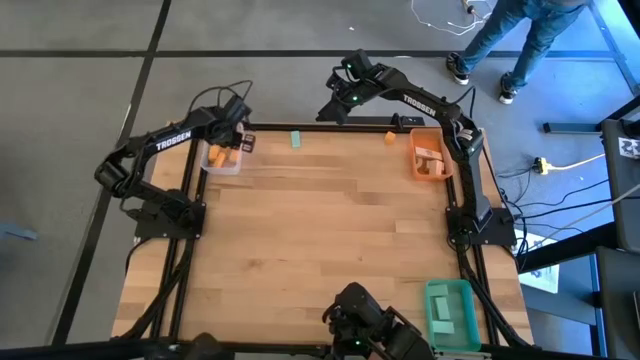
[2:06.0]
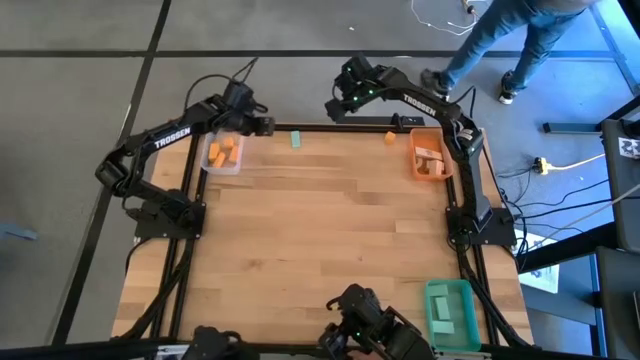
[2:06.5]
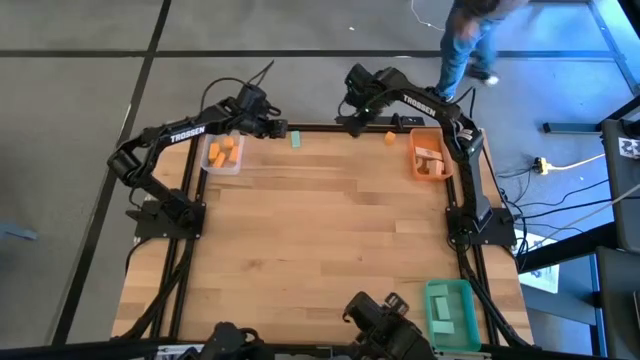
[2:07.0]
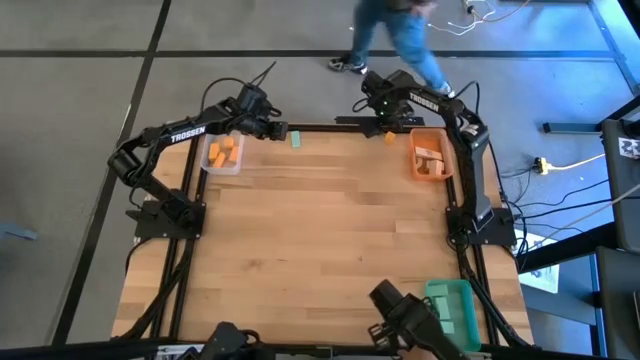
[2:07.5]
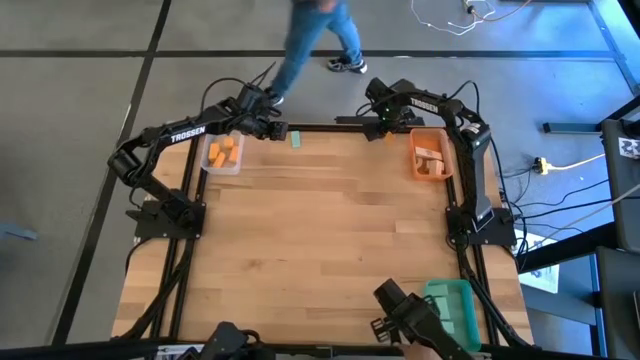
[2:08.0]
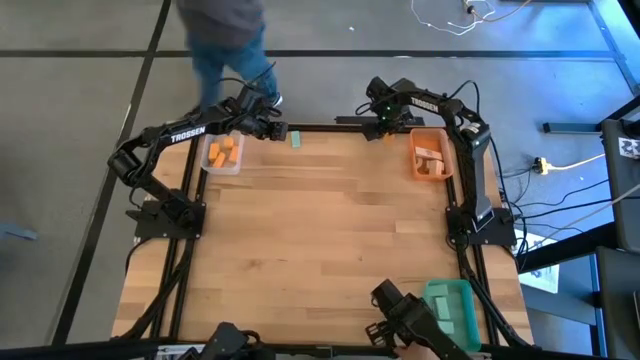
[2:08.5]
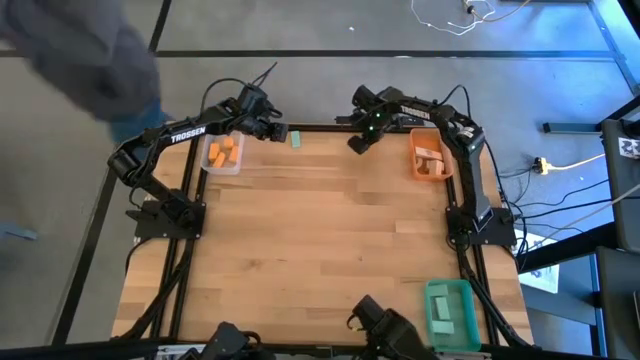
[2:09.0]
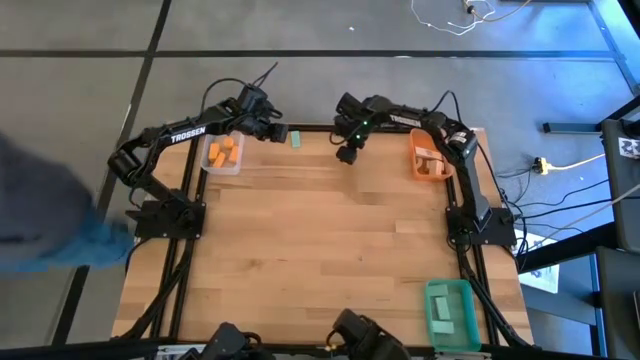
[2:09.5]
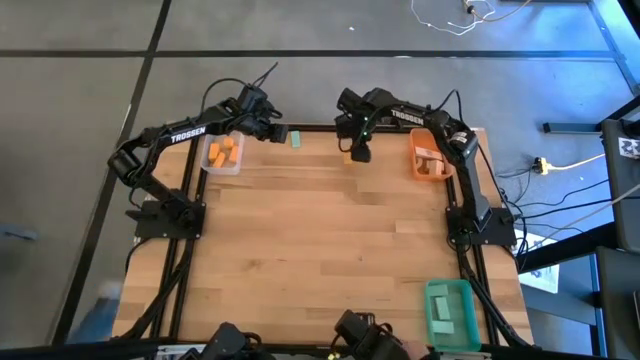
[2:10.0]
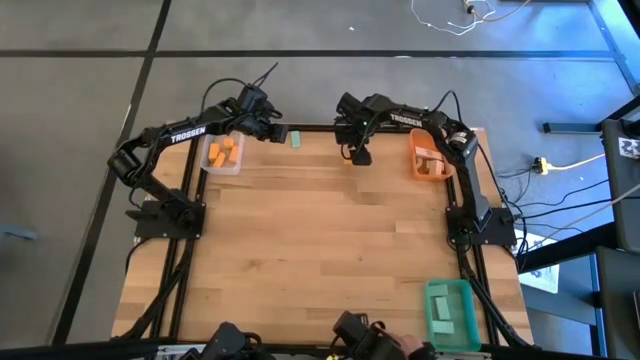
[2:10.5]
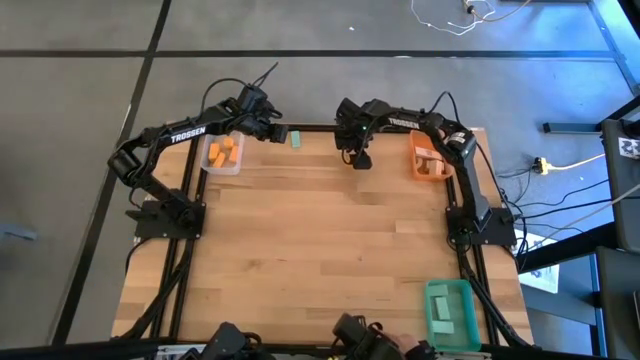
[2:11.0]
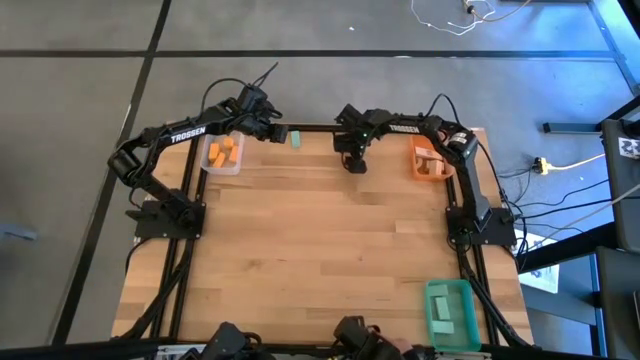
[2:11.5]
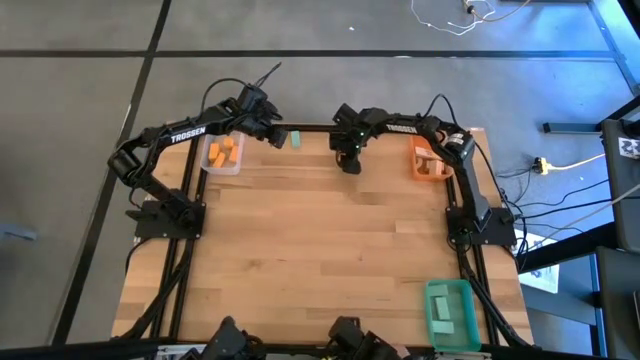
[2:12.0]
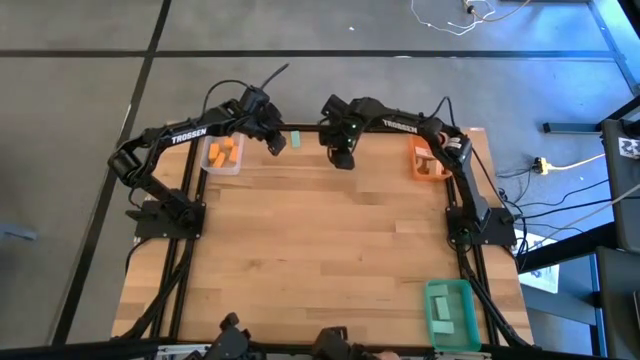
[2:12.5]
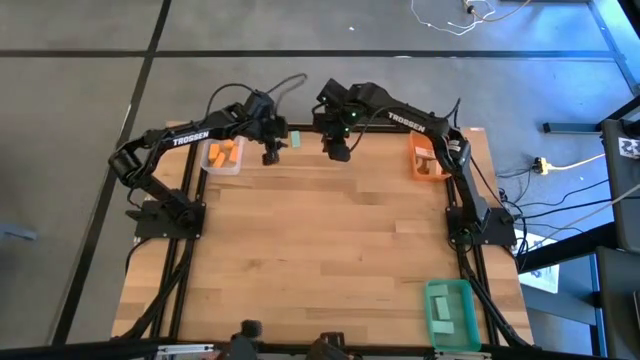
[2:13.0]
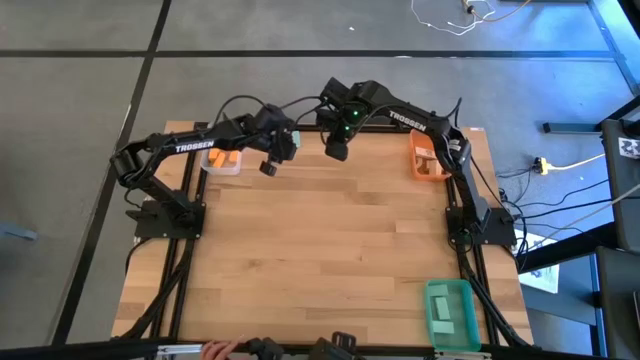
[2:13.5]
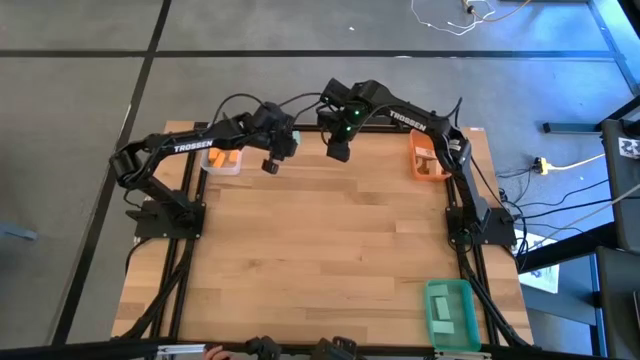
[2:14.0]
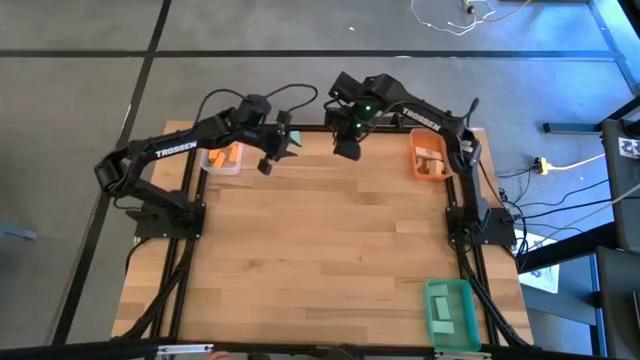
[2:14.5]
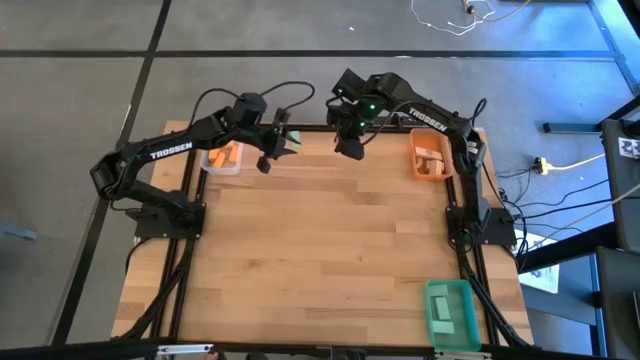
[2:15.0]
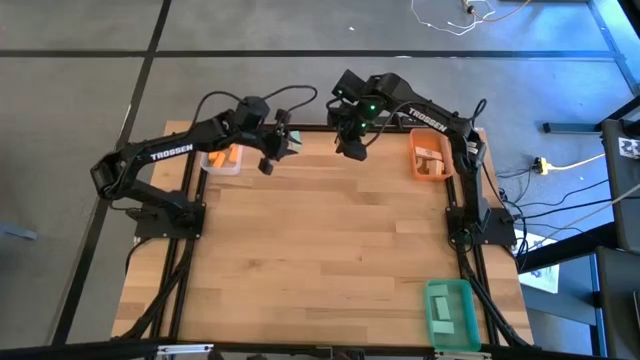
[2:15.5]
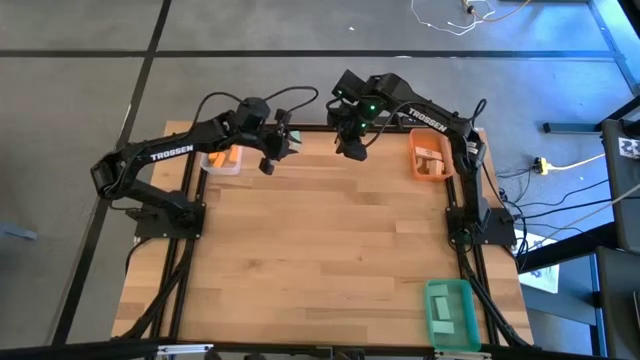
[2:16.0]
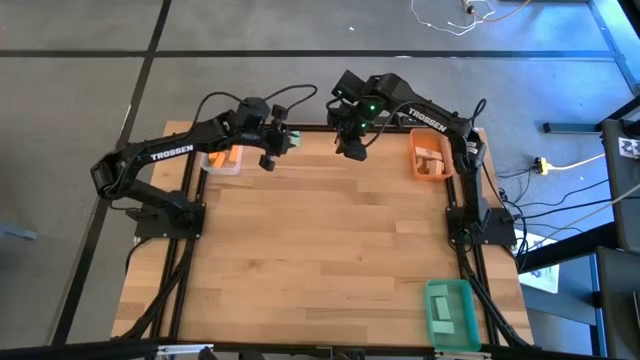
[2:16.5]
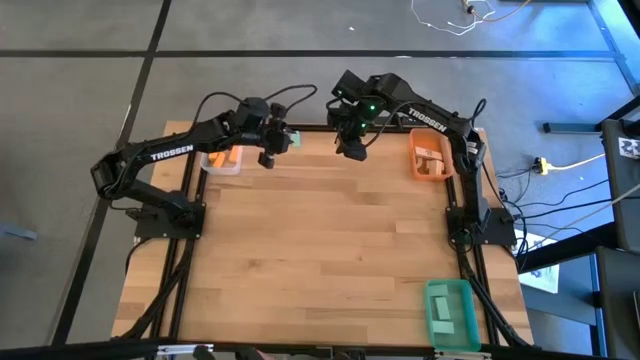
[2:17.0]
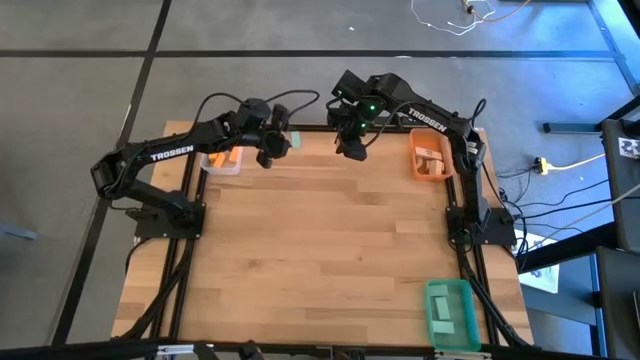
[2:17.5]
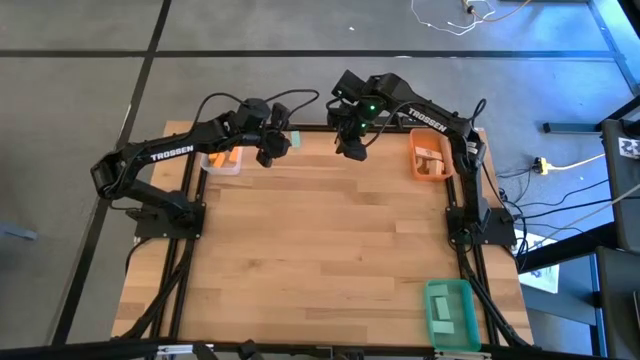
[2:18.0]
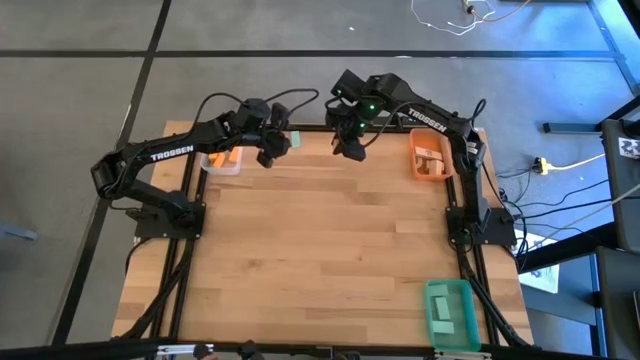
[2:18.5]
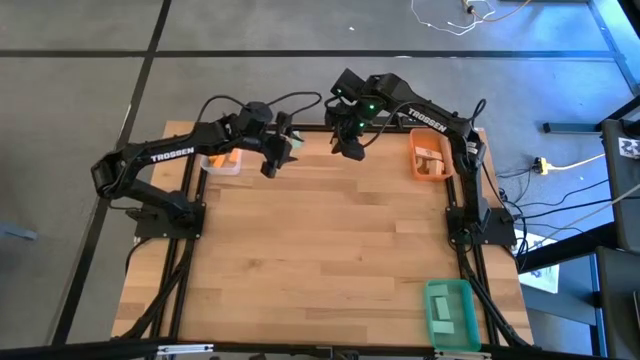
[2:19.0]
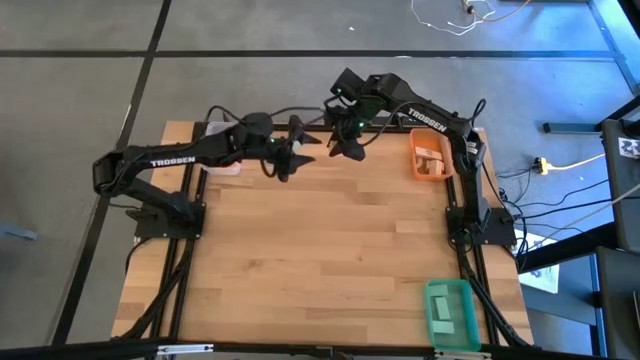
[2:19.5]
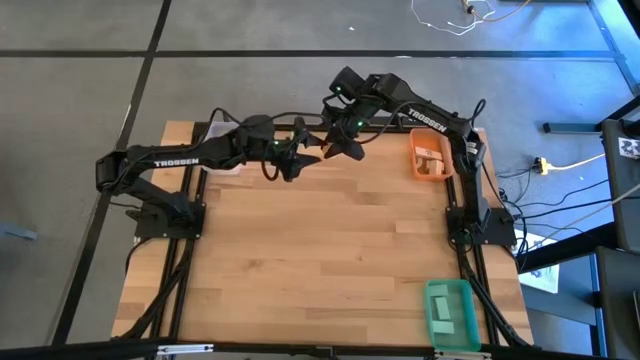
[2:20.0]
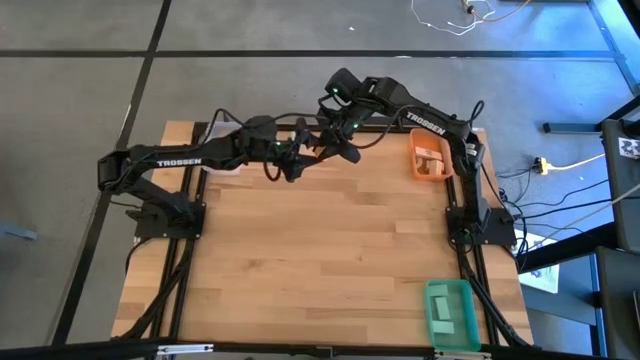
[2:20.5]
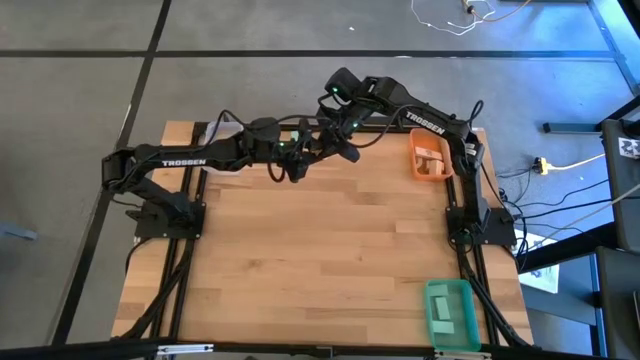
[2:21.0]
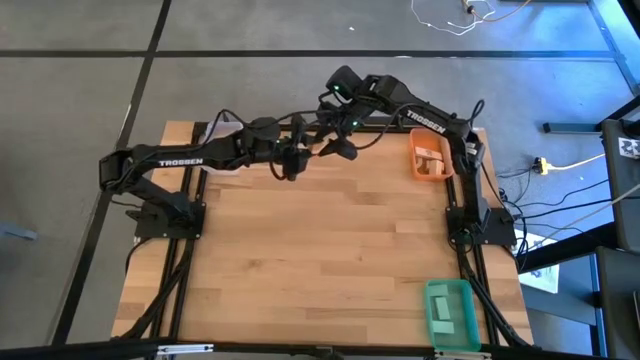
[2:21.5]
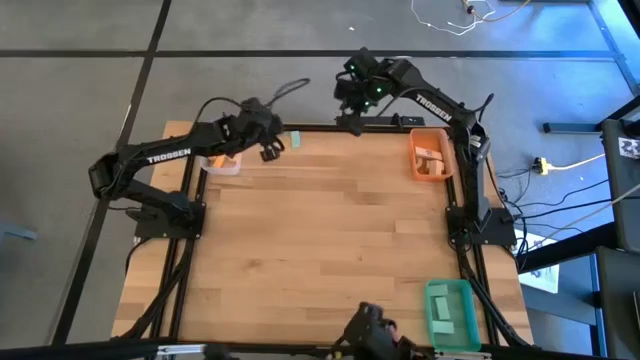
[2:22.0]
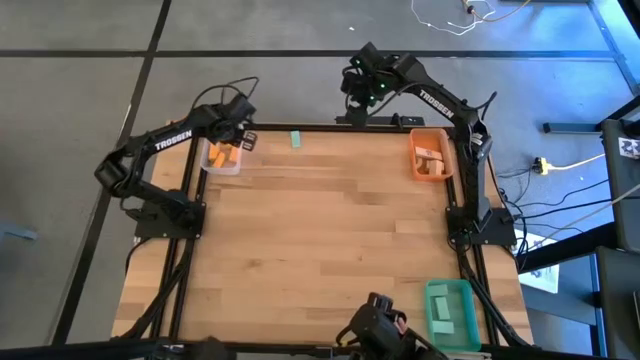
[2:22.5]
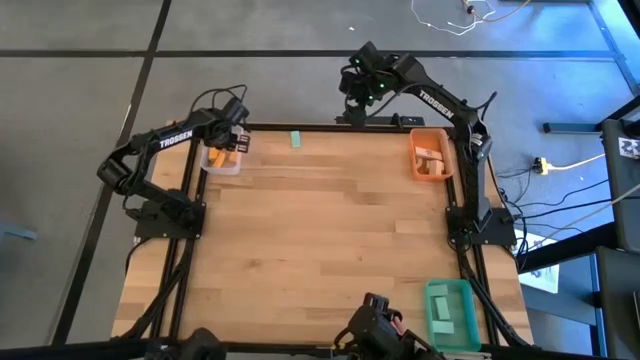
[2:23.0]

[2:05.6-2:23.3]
Task: Sort & place blocks by color
Put the orange block into the transparent bin

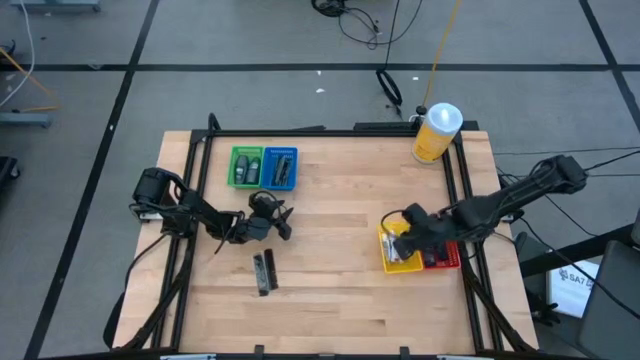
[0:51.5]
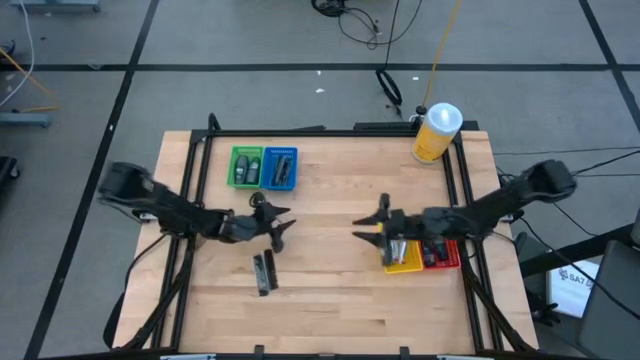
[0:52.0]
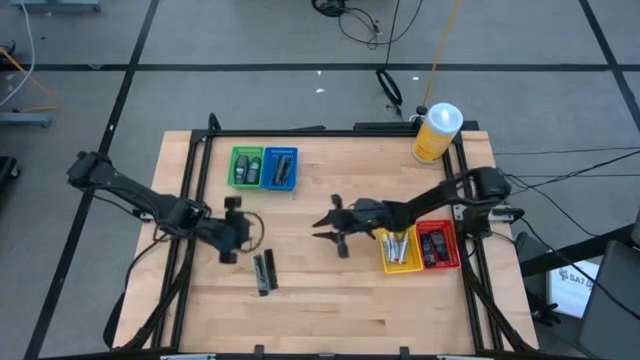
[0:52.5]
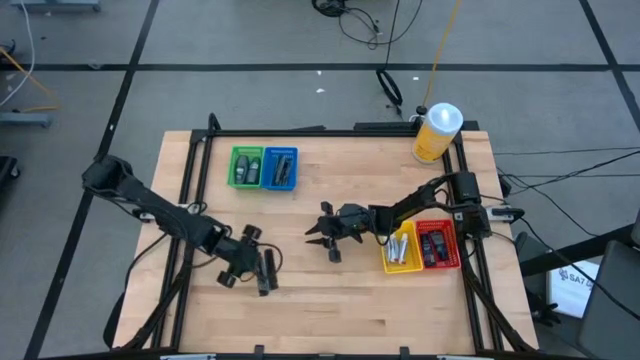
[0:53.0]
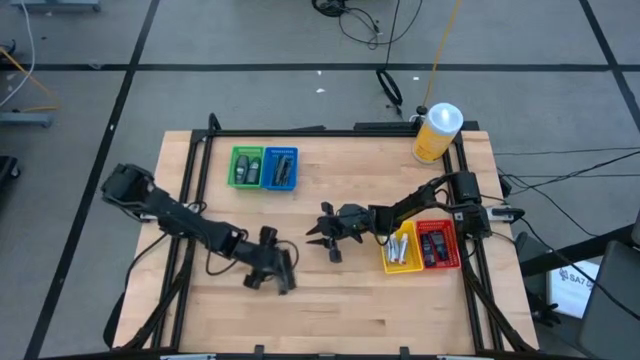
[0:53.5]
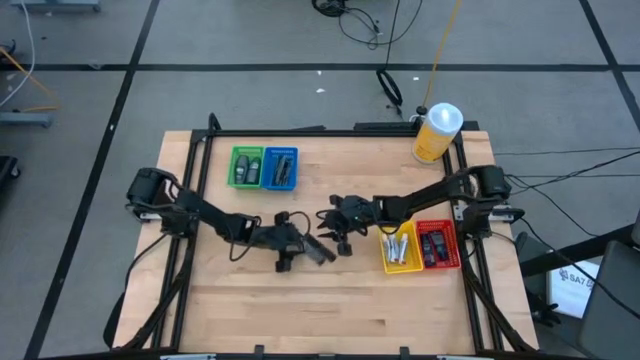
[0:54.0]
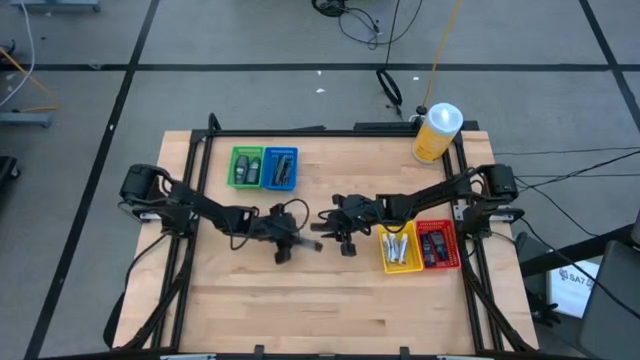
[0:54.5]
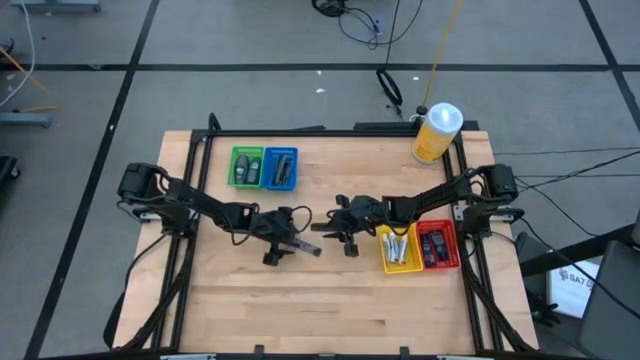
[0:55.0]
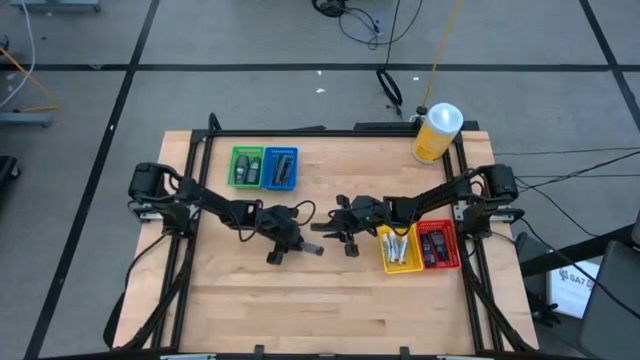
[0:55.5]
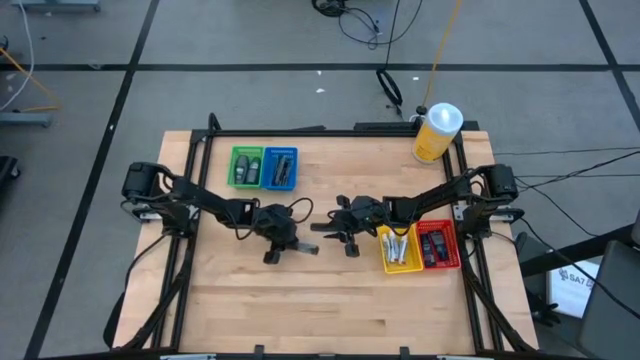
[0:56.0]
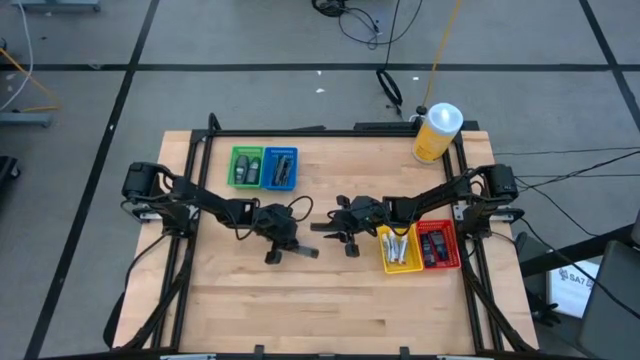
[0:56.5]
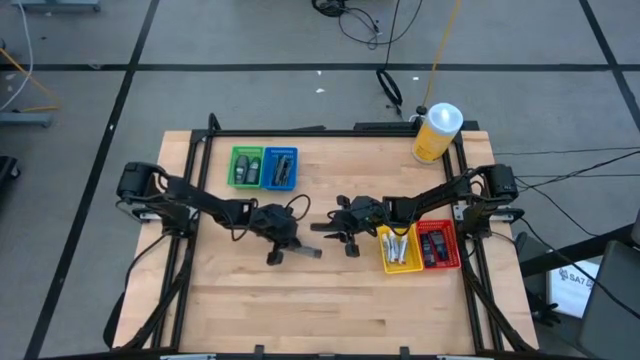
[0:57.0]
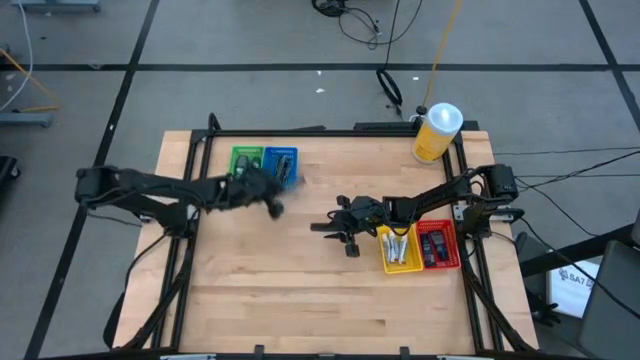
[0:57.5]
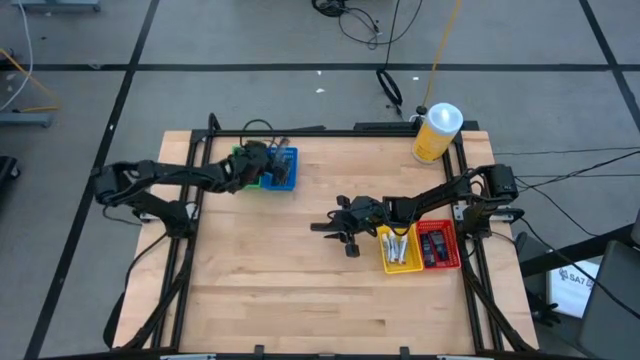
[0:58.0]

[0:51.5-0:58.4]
Task: Pick & Place Travel size toiletries
Put the black comb into the blue bin
